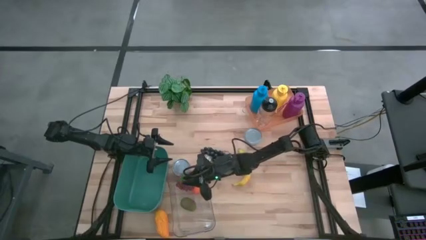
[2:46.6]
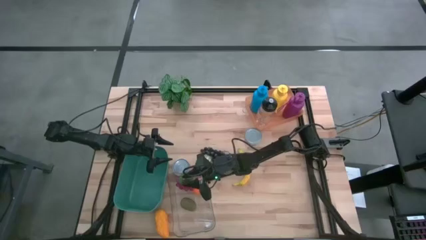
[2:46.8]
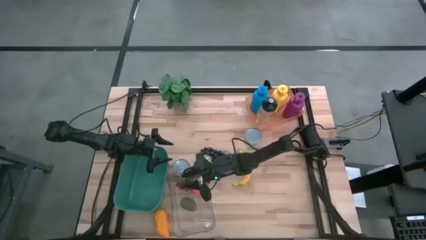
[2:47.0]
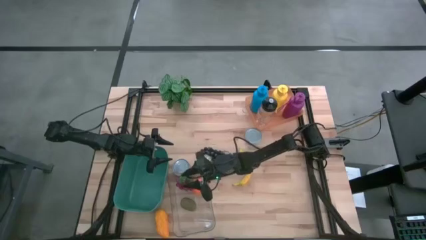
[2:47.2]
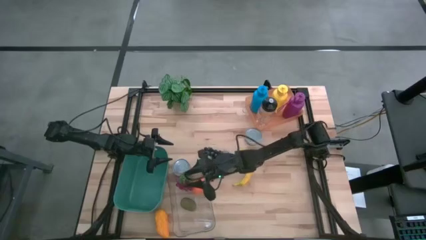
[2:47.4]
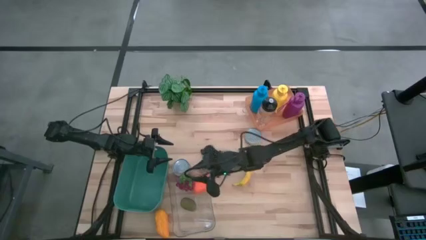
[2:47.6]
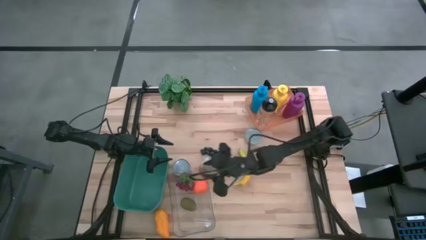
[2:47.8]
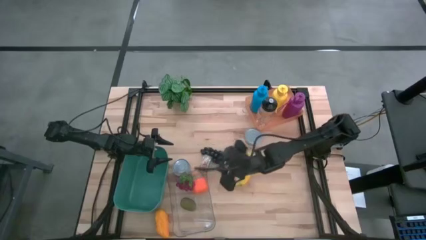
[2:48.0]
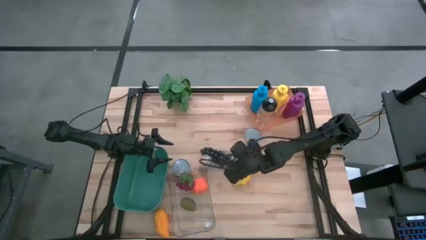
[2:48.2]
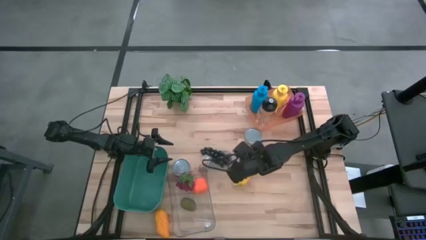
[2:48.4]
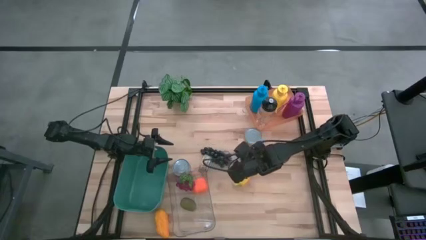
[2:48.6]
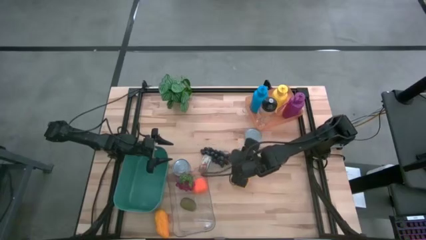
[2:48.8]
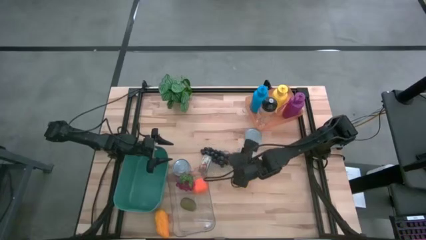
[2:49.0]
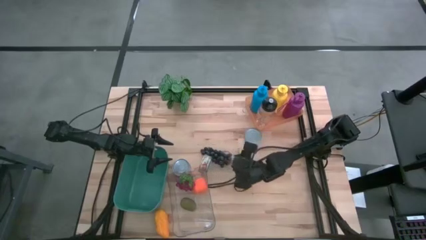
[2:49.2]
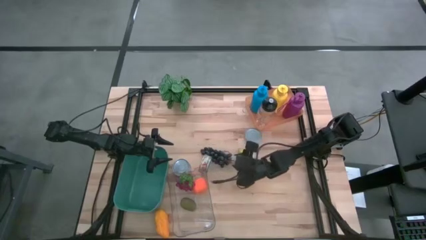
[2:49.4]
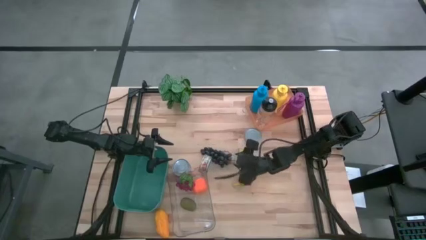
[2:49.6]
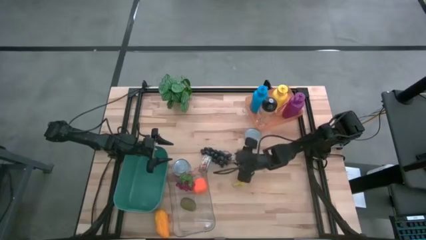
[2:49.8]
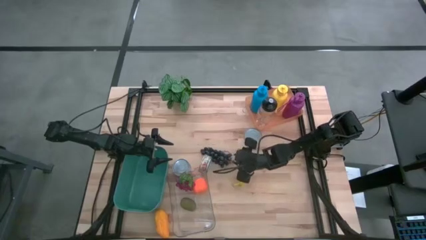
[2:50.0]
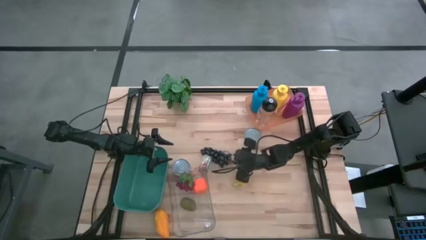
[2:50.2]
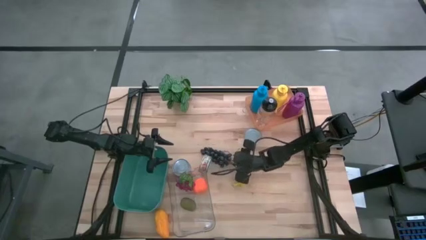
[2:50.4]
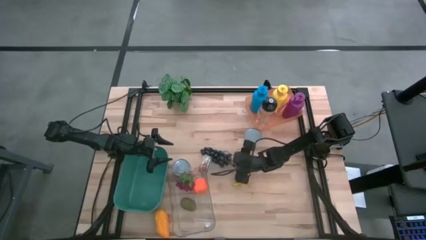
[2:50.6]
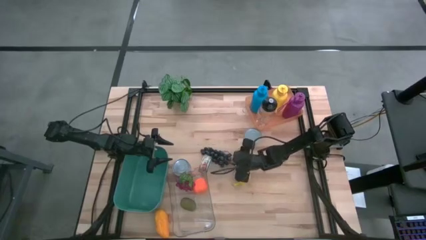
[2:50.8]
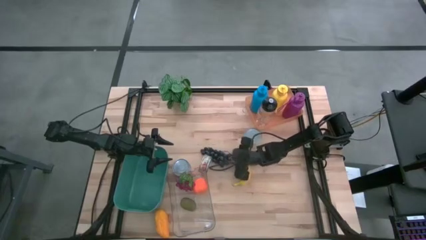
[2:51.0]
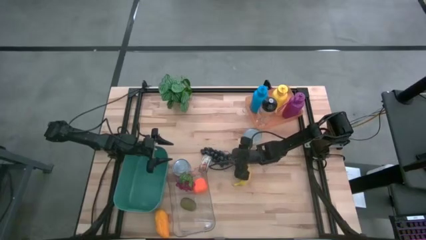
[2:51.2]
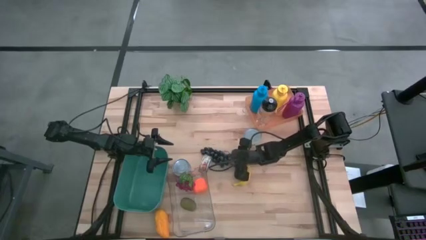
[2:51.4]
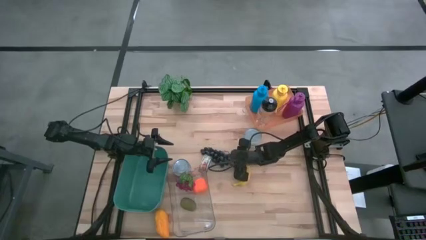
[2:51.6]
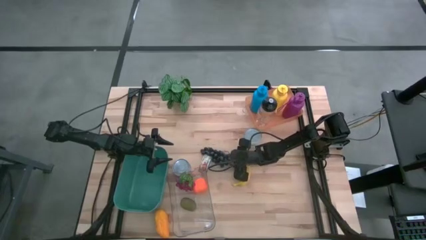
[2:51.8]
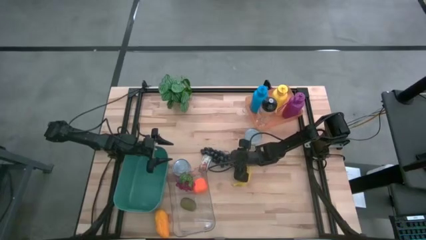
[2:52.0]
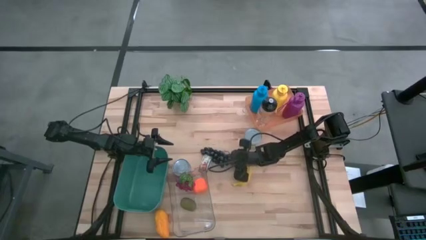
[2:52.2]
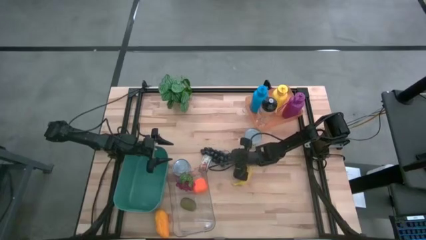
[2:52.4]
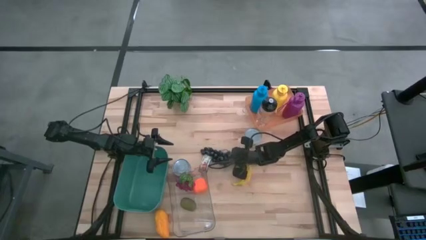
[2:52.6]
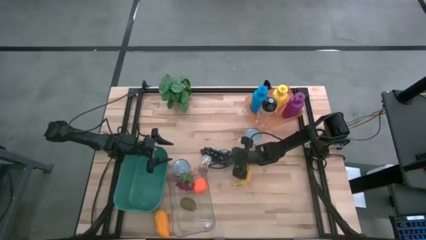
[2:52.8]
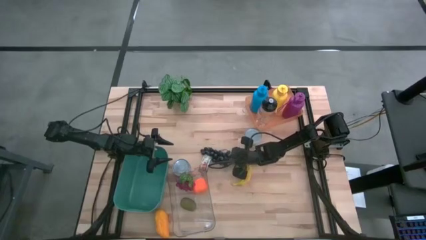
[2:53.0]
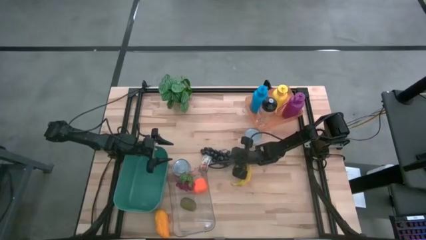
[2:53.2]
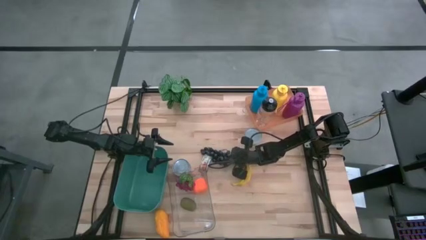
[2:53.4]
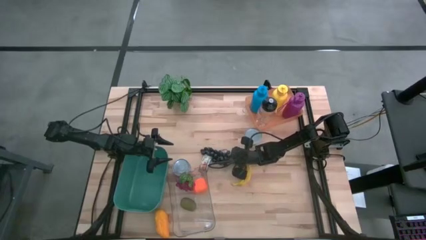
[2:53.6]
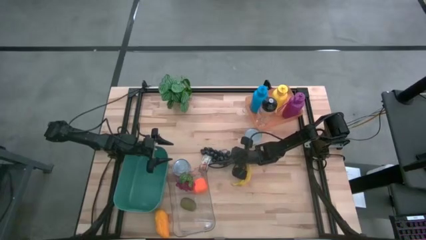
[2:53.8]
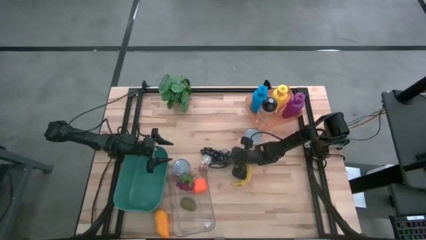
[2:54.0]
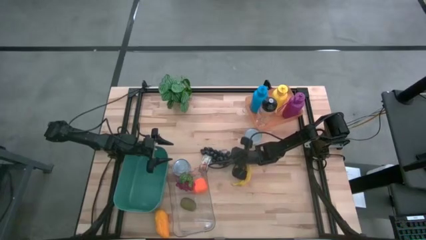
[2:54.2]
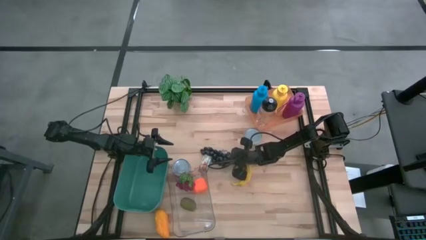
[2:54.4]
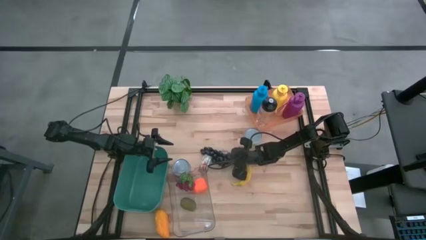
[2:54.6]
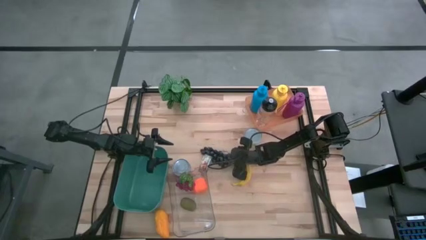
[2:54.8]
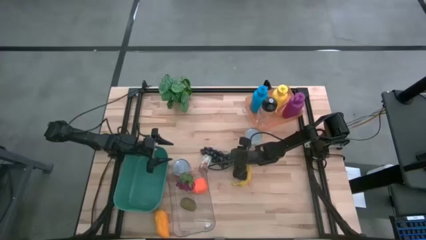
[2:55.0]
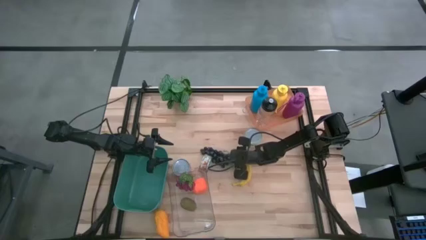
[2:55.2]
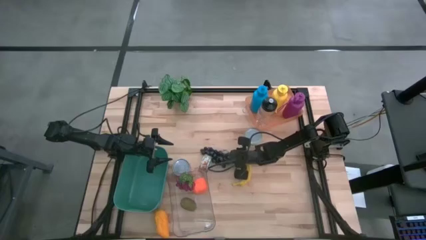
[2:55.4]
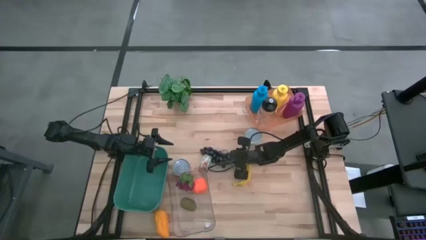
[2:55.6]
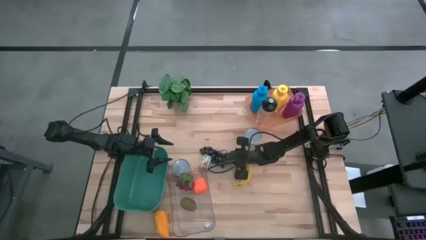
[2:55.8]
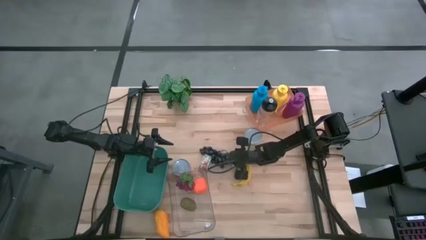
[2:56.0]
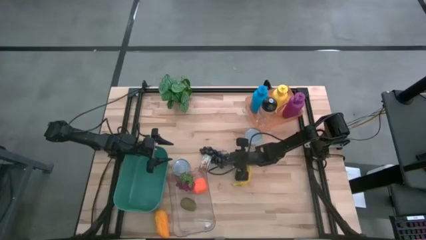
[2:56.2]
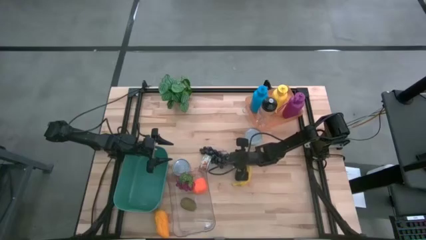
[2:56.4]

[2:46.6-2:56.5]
Task: Pick & Place Food Item
Put the black grapes into the transparent bin

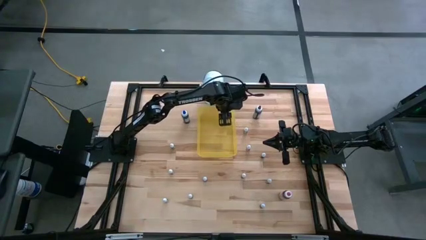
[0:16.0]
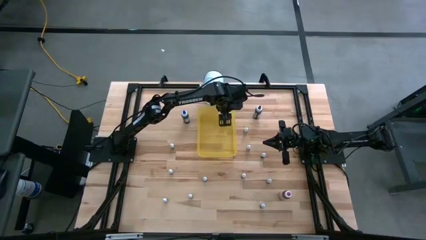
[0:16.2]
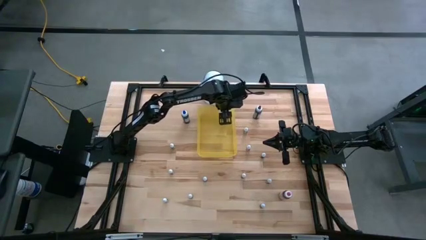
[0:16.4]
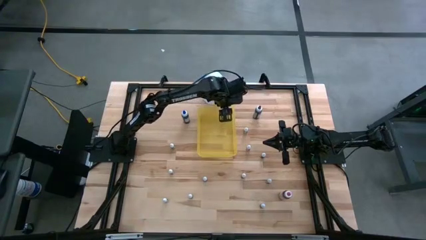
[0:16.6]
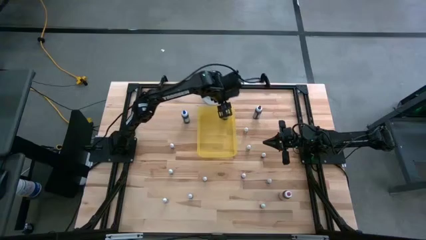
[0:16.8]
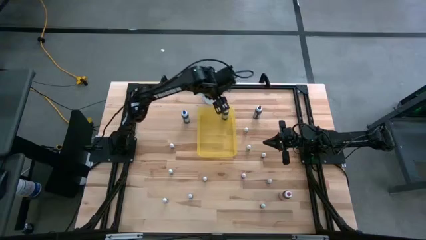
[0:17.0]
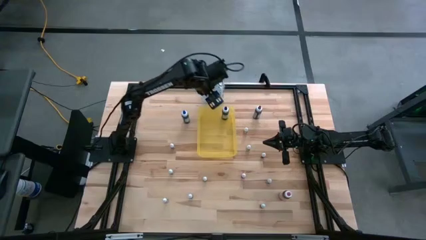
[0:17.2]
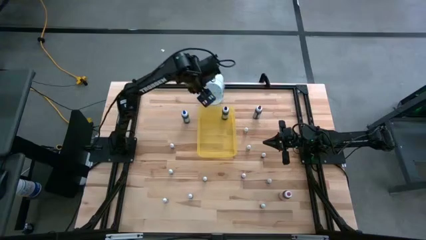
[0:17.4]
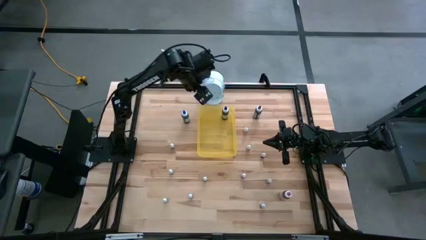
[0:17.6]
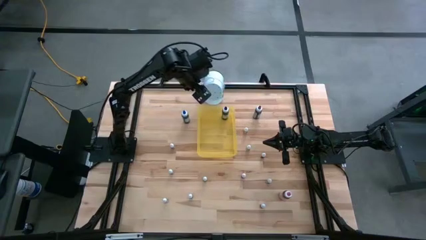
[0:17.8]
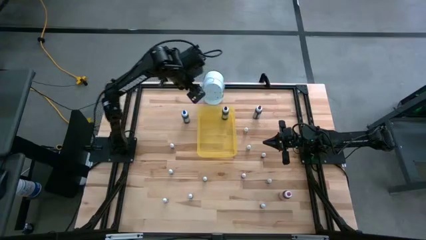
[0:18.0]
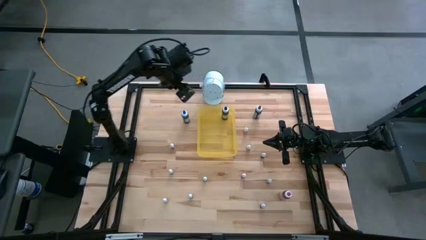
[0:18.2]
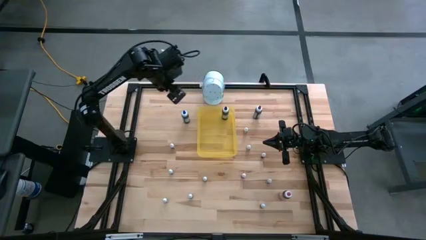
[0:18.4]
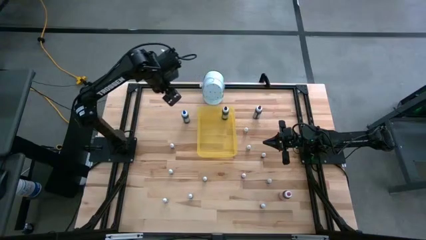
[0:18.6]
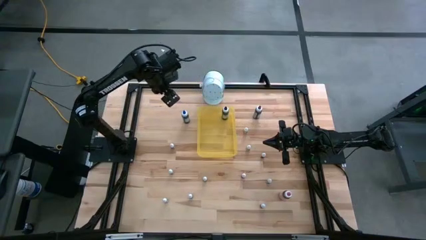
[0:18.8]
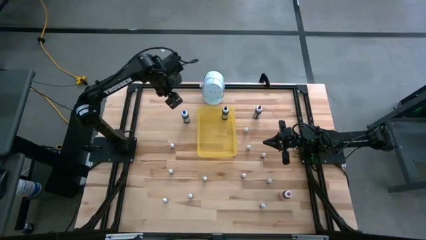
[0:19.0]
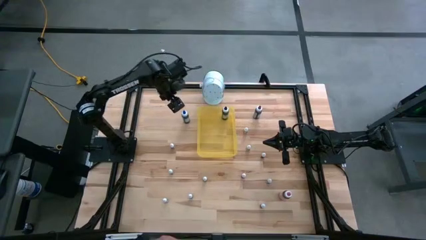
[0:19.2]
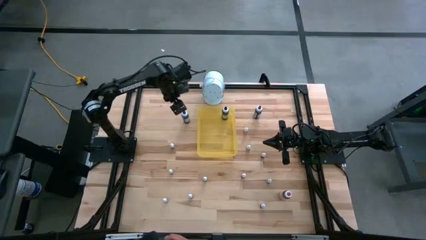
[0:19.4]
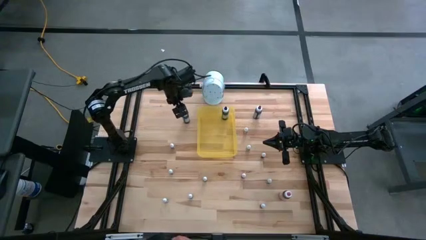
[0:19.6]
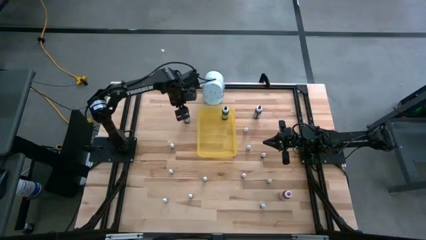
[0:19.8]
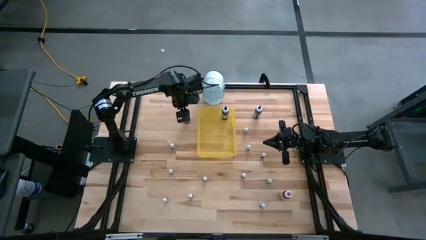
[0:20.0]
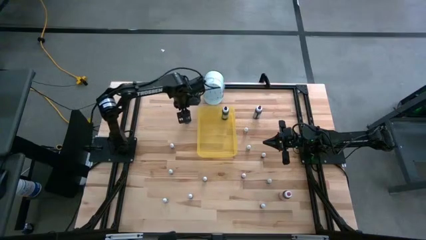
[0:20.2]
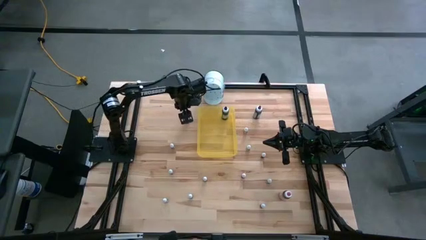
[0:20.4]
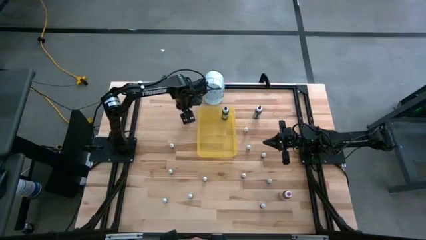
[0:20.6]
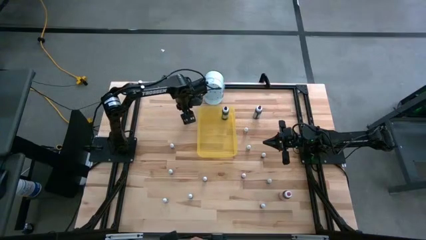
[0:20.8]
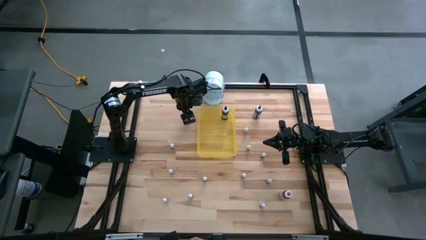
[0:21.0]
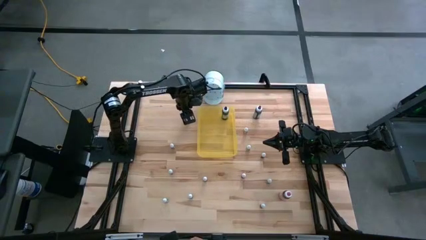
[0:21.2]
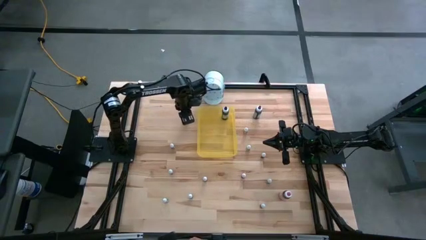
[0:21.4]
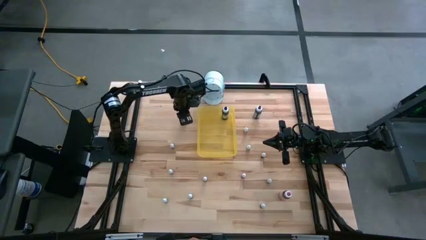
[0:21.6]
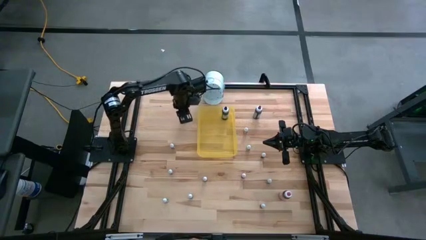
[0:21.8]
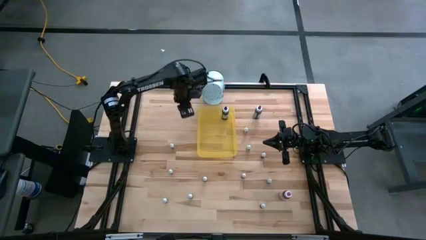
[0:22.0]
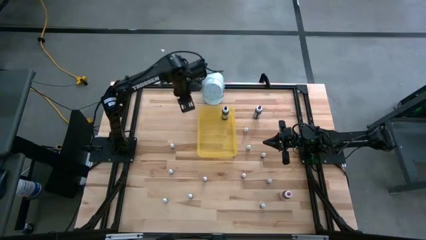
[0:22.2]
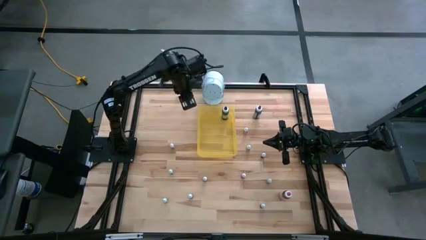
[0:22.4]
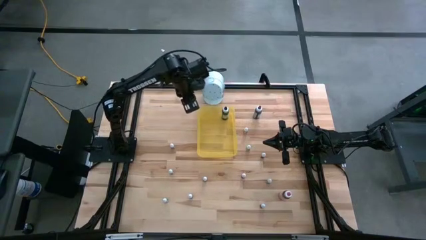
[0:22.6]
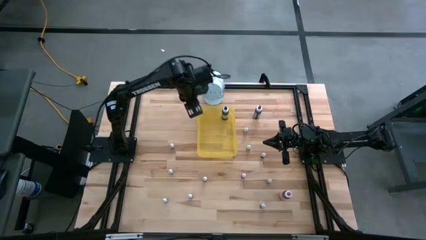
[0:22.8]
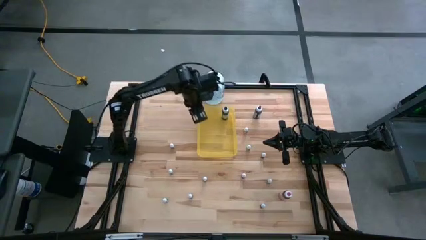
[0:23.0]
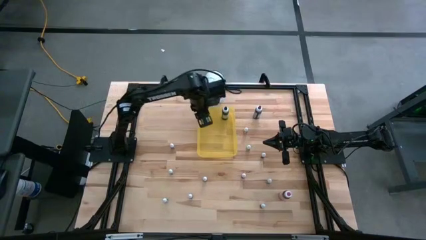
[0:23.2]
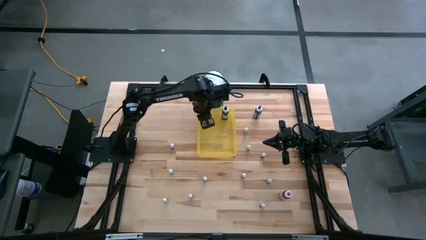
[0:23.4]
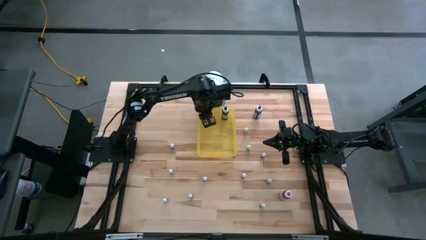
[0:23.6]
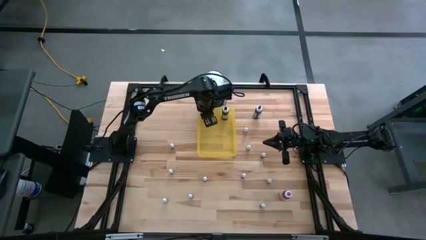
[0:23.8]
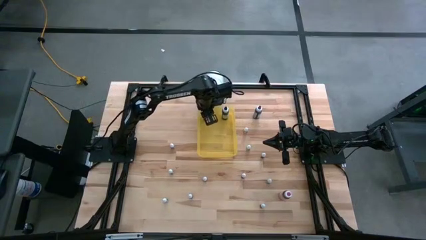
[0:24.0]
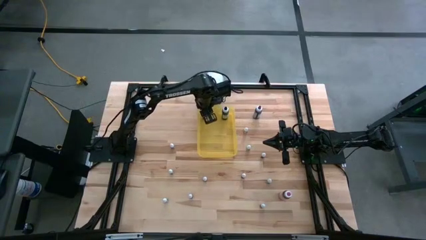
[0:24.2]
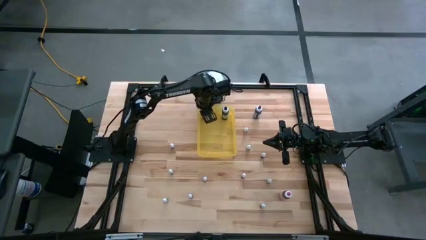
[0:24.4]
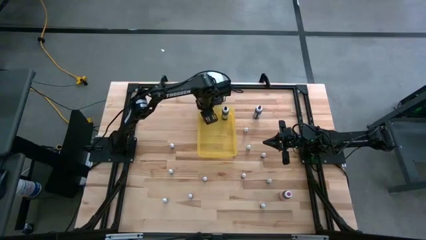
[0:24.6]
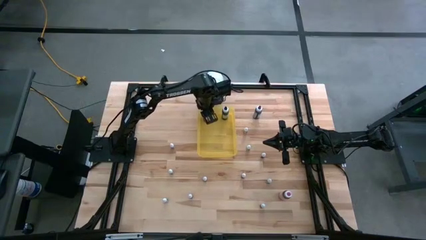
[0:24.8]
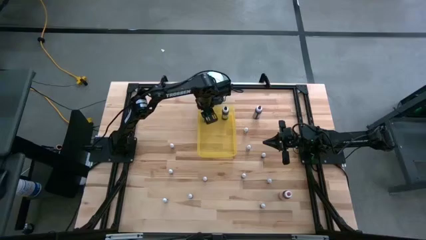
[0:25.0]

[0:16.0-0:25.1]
Task: Pick & Place food coloring
Put the big blue food coloring bottle in the yellow transparent bin
